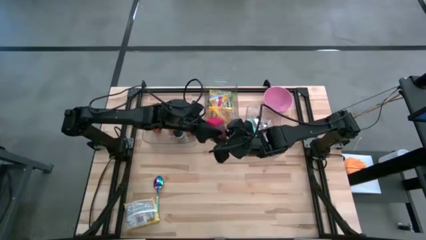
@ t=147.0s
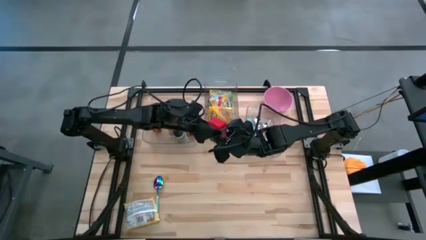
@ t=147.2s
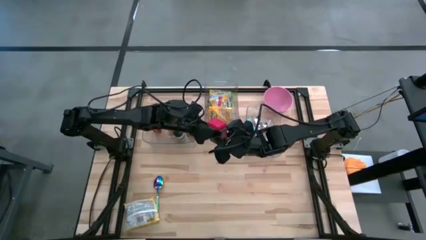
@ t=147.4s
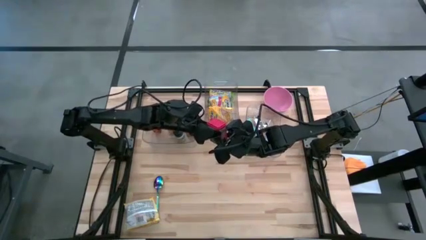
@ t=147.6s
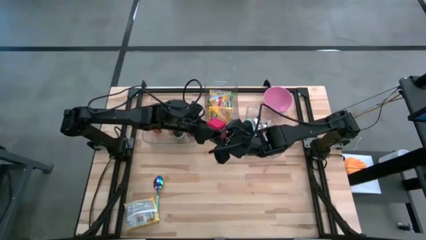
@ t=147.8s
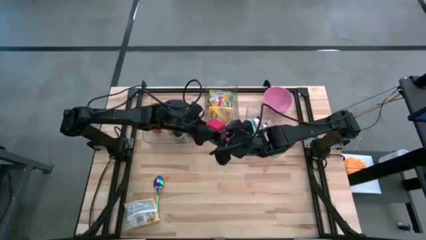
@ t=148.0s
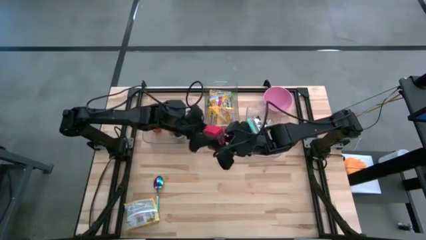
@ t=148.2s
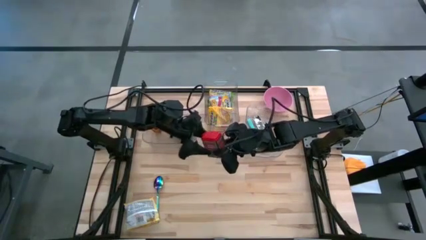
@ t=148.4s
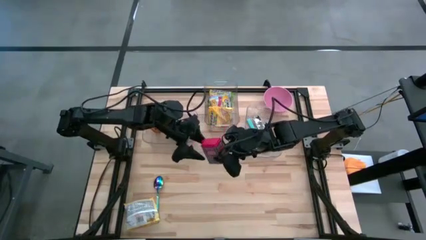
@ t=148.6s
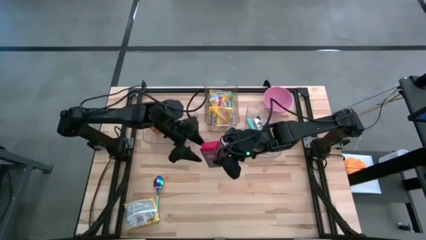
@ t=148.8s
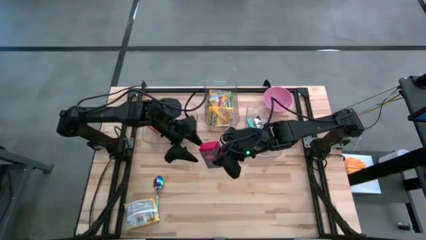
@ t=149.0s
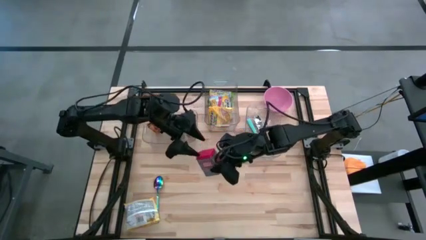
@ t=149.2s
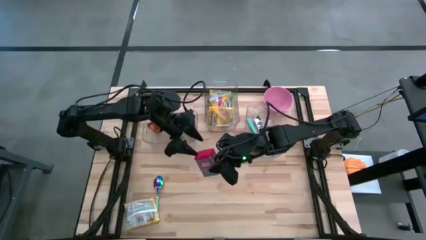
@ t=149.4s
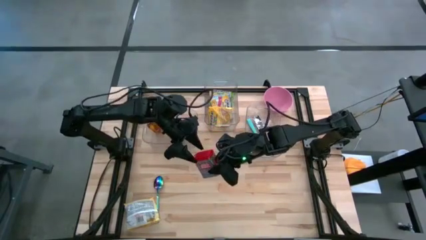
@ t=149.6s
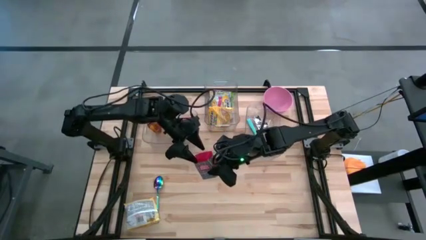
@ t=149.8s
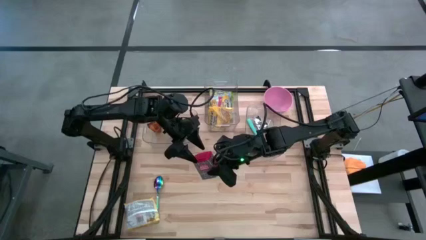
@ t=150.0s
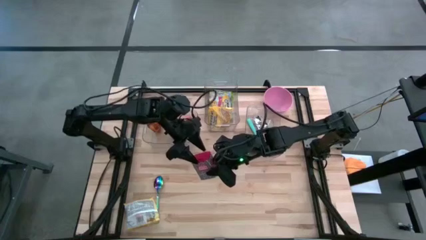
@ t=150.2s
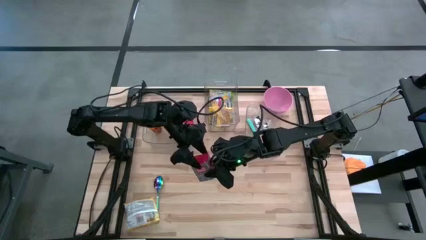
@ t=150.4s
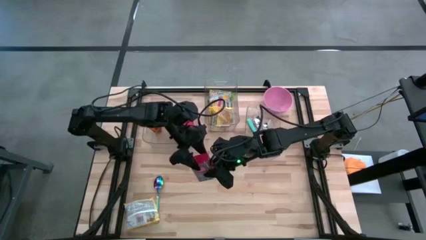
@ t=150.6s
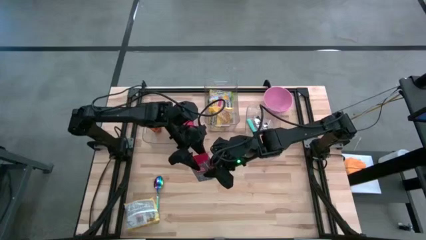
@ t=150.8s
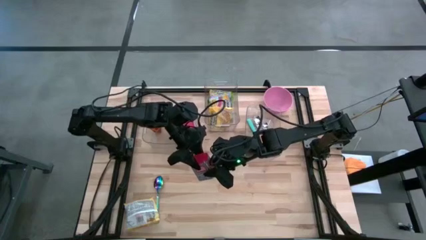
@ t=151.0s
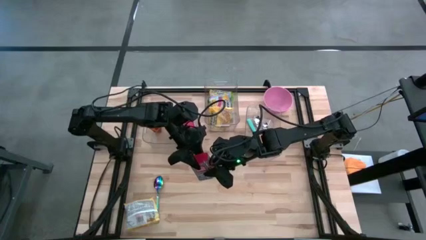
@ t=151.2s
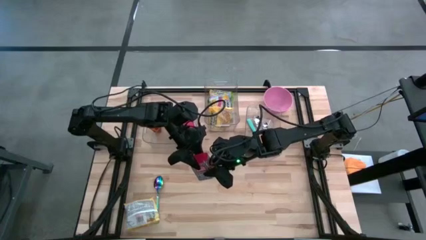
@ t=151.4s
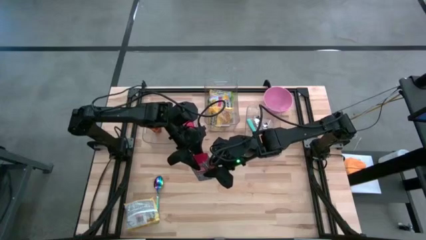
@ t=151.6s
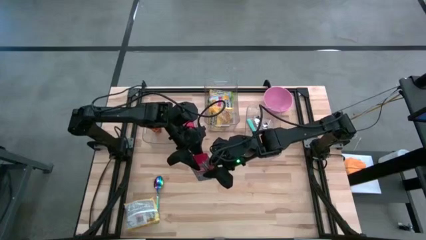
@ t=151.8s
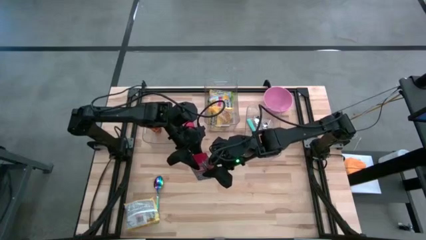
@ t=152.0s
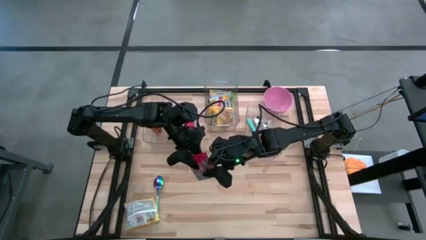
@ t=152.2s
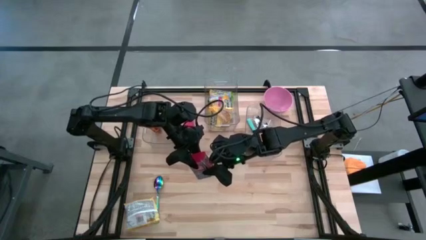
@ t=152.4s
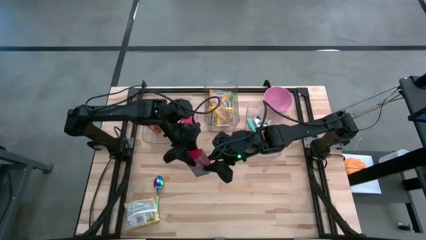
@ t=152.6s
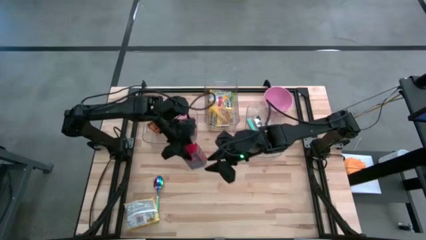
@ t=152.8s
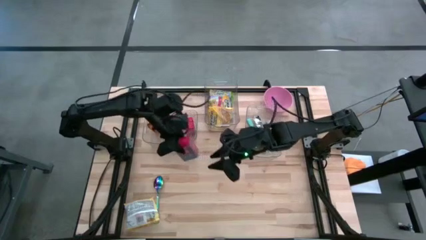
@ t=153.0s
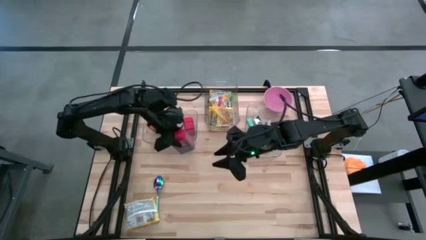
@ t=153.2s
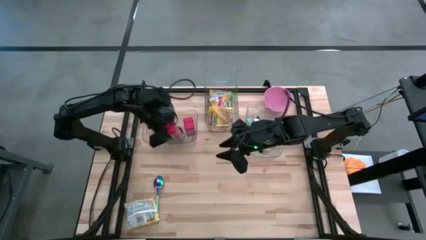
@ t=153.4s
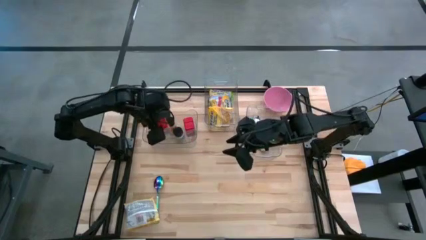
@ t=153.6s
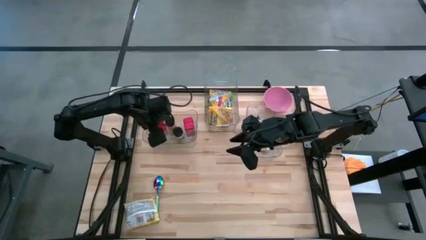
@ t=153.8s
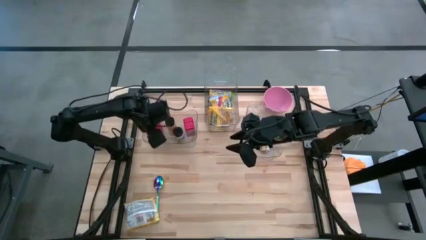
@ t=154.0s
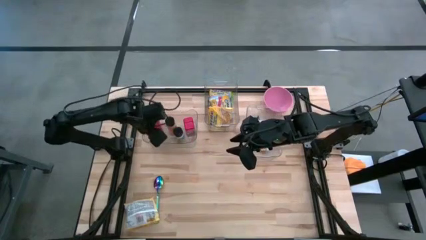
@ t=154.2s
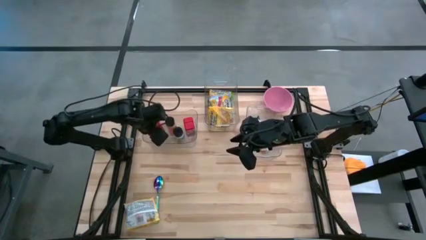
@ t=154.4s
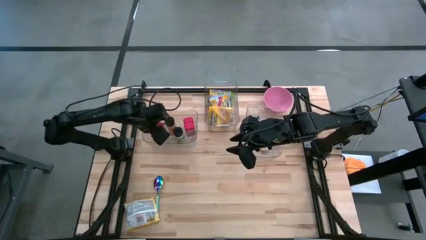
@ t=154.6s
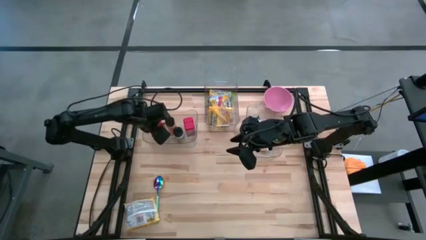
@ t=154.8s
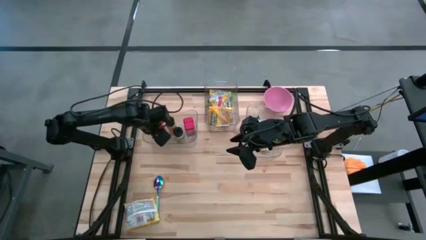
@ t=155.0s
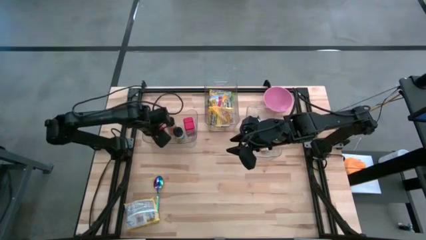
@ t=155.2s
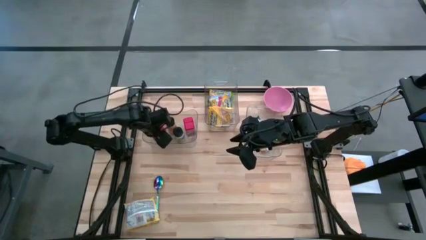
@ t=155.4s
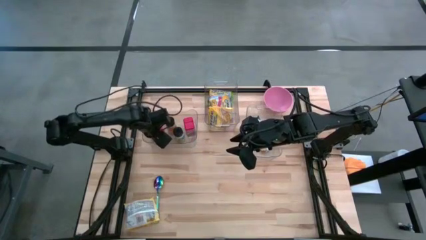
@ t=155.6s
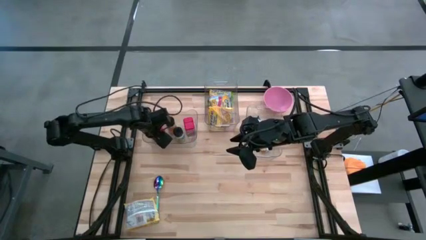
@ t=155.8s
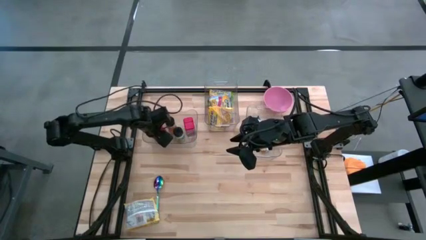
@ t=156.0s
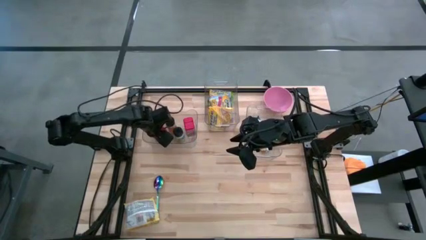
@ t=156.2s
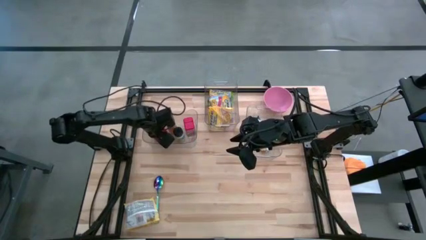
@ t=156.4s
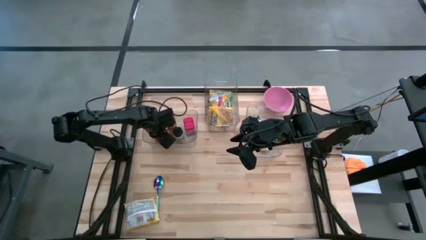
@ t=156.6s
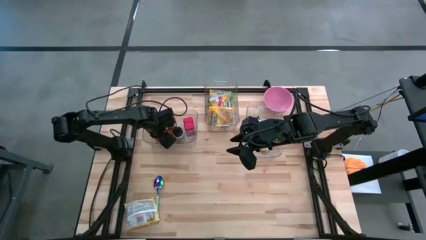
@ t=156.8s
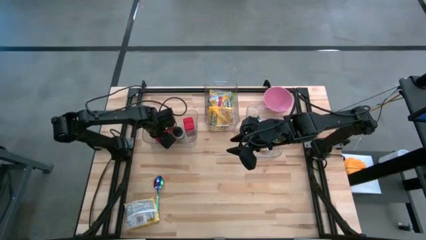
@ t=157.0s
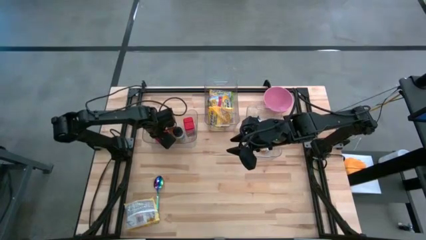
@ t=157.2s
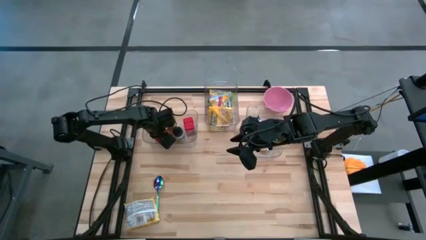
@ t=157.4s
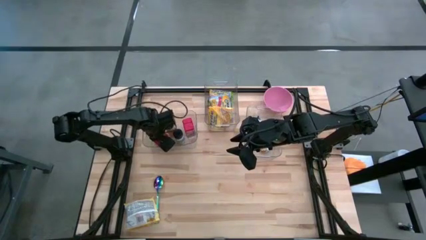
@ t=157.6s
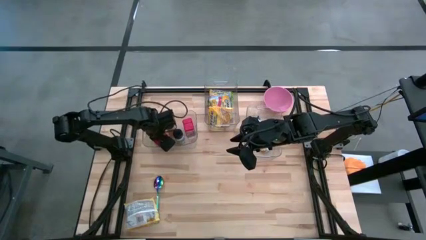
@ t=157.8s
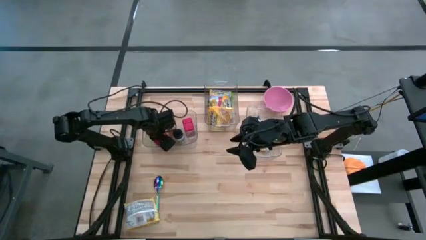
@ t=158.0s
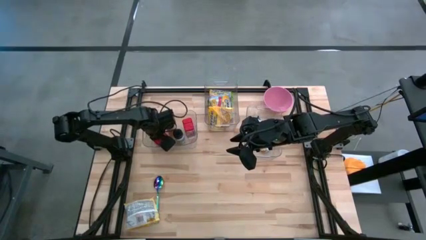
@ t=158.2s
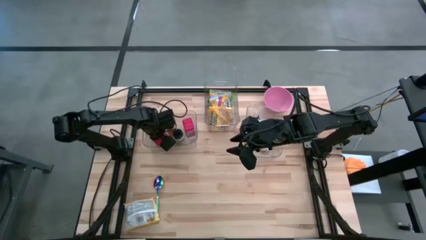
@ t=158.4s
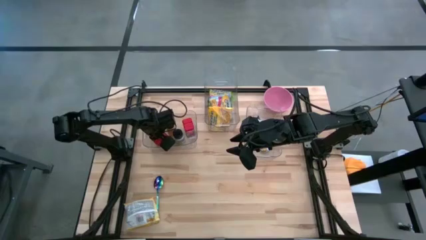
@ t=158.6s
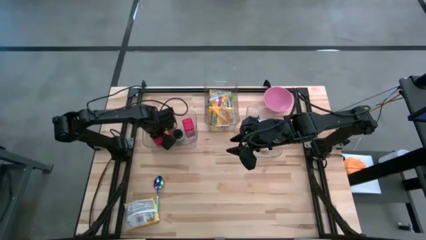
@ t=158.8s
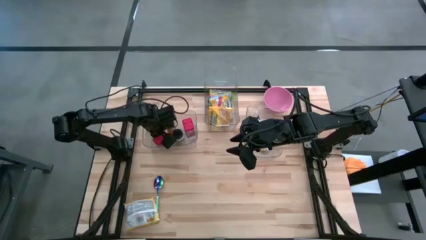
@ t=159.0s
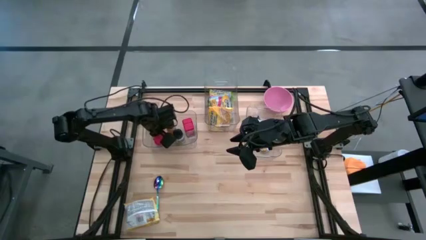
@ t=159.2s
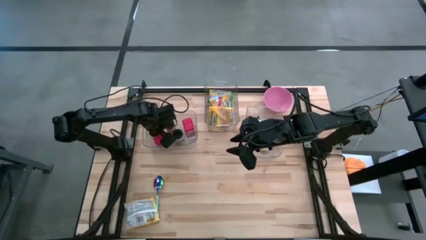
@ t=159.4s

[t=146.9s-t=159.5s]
Put the red seasoning can into the left transparent bin
